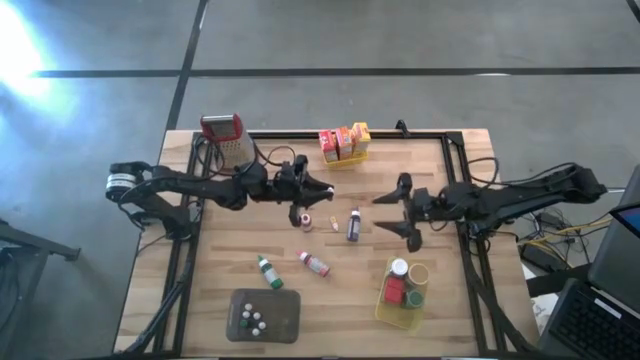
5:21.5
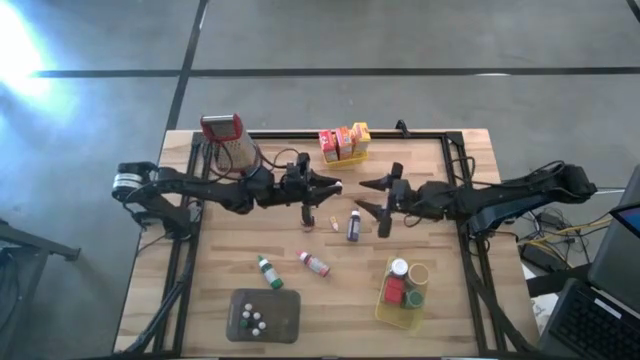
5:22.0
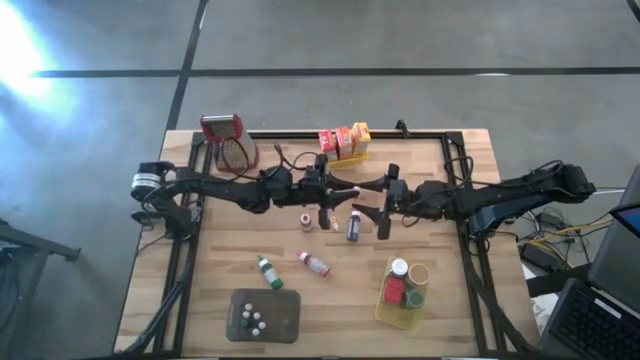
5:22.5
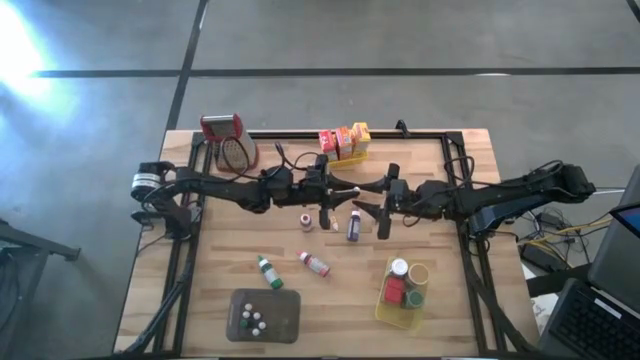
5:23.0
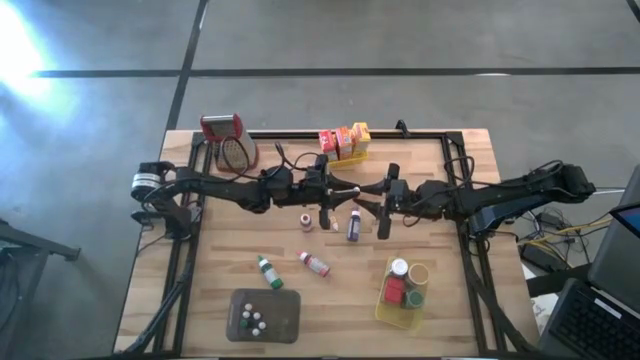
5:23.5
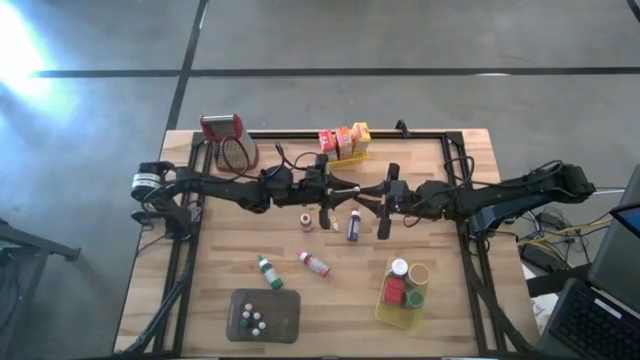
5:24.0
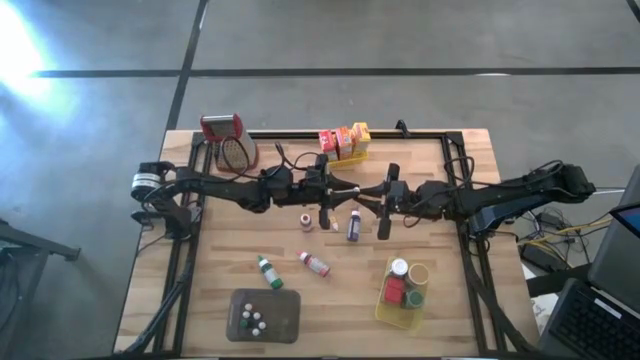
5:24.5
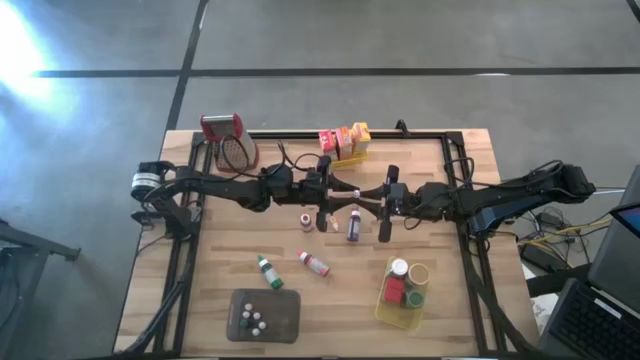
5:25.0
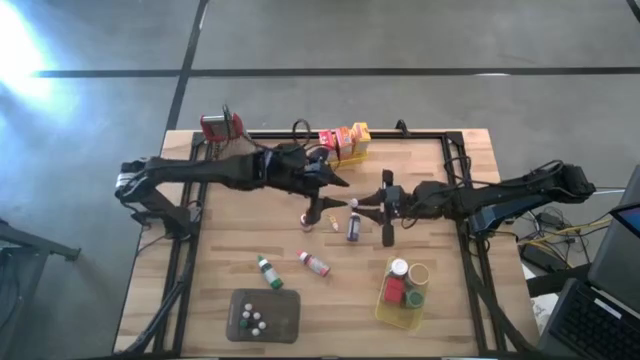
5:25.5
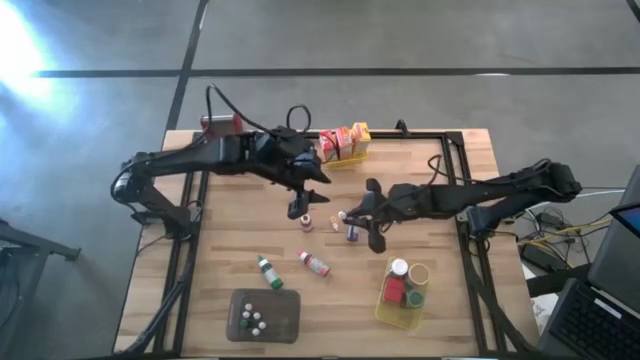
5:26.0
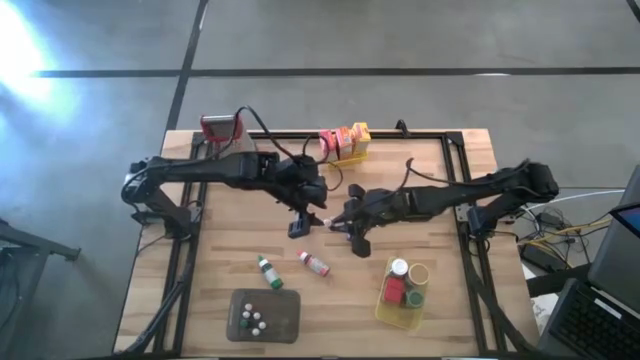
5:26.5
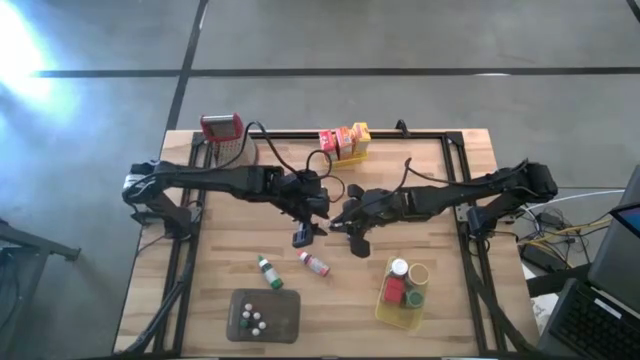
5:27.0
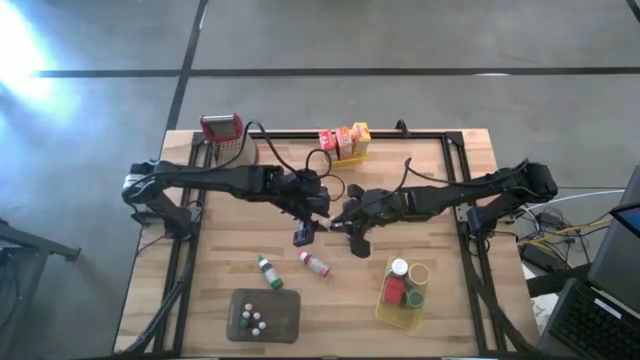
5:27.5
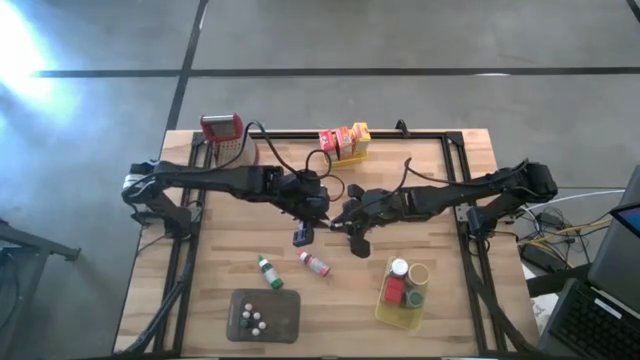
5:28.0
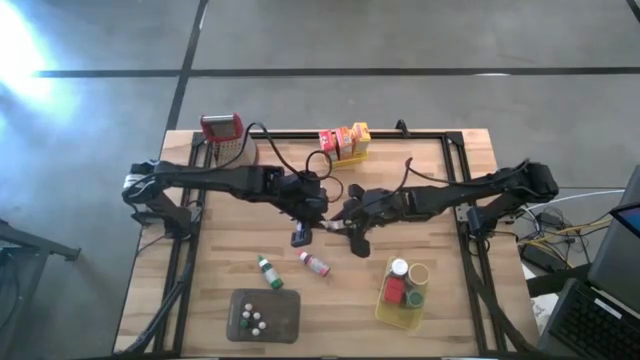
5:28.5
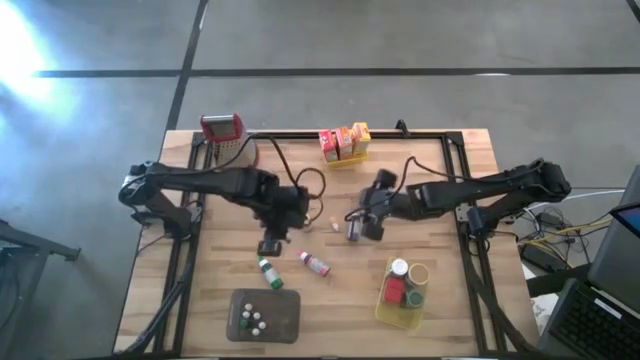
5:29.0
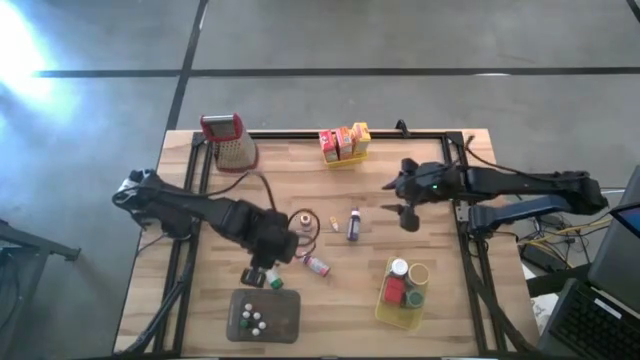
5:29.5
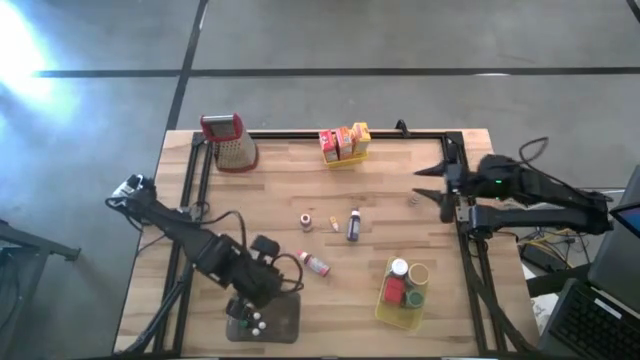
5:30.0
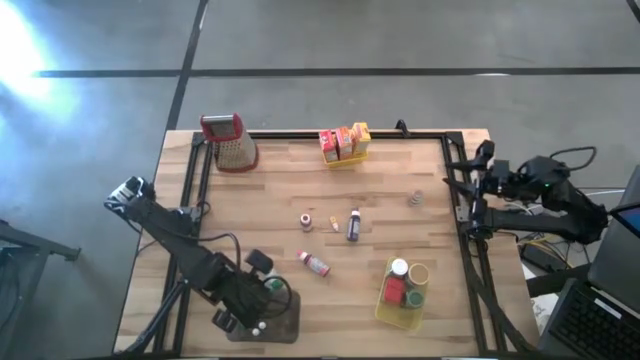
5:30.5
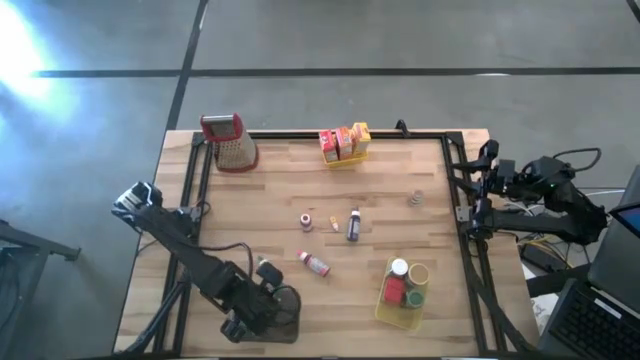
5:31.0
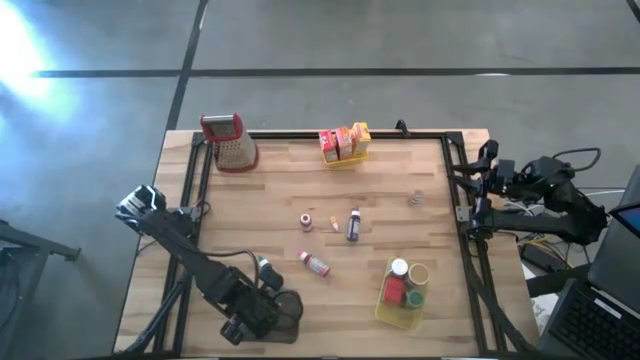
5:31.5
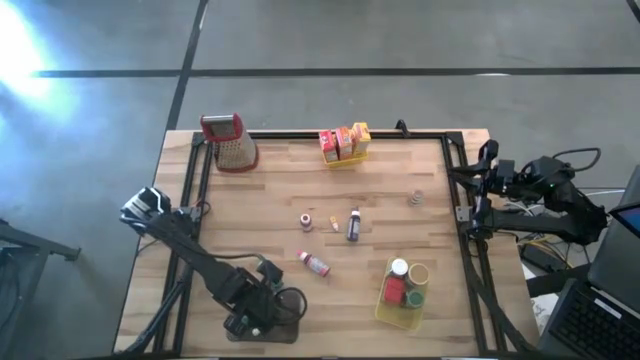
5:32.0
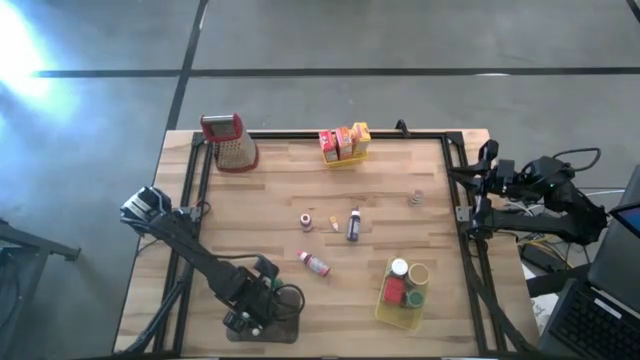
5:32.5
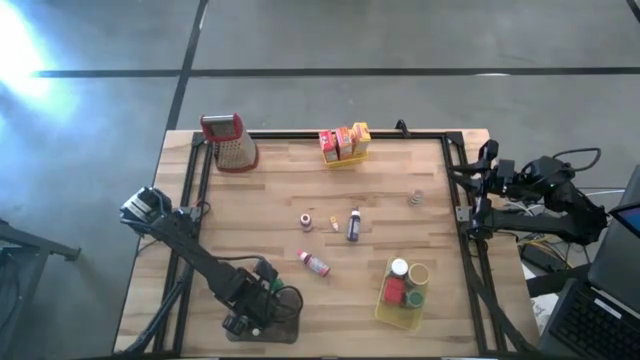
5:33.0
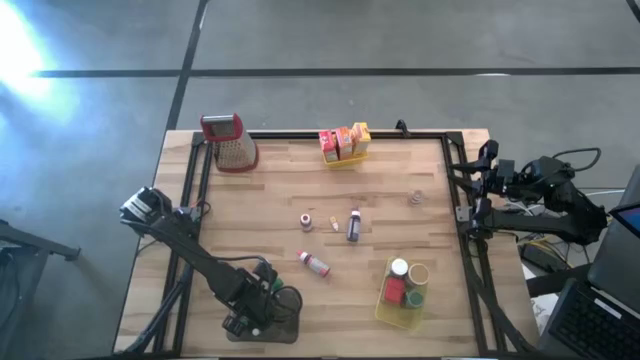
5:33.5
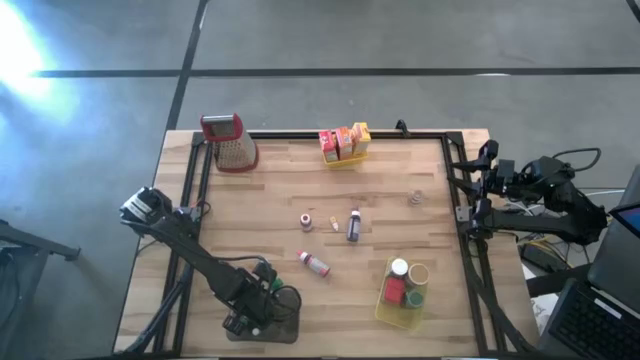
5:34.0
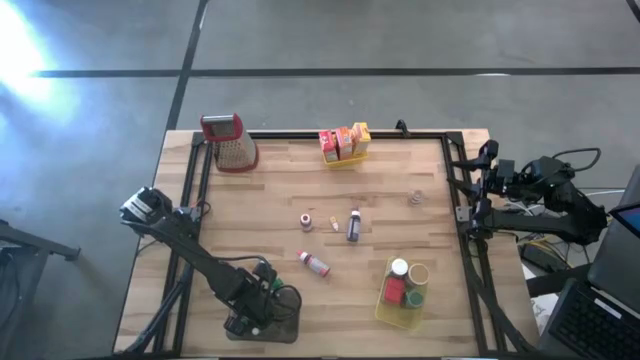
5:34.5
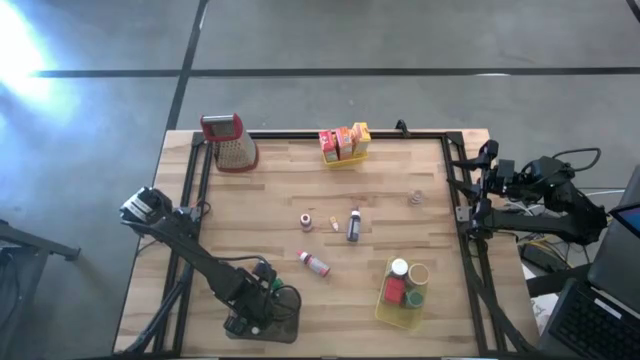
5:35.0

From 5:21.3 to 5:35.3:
Task: Pick & Place Kitchen Items
Put the black food coloring bottle into the black bin

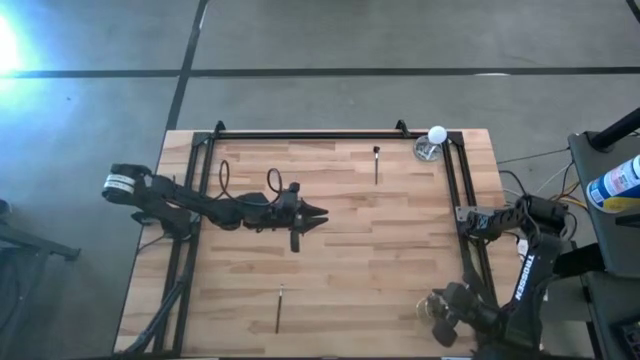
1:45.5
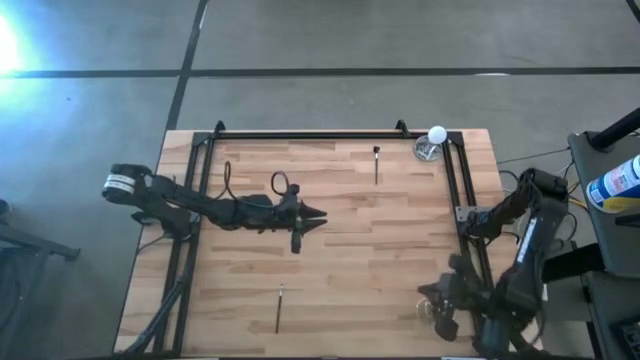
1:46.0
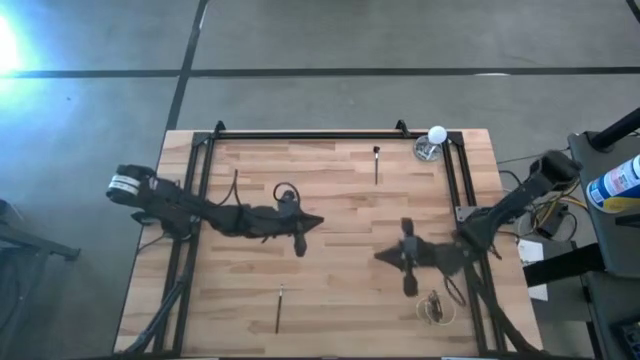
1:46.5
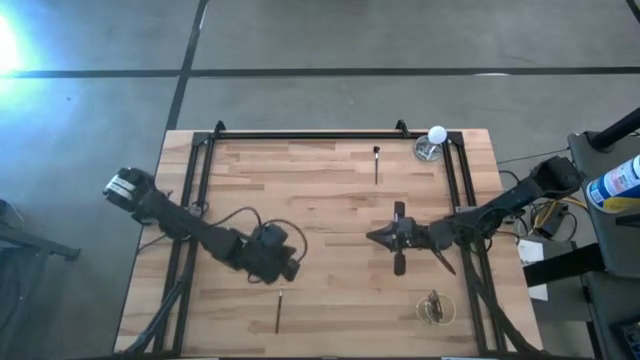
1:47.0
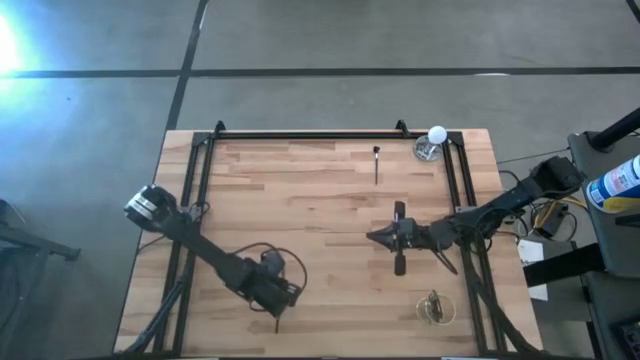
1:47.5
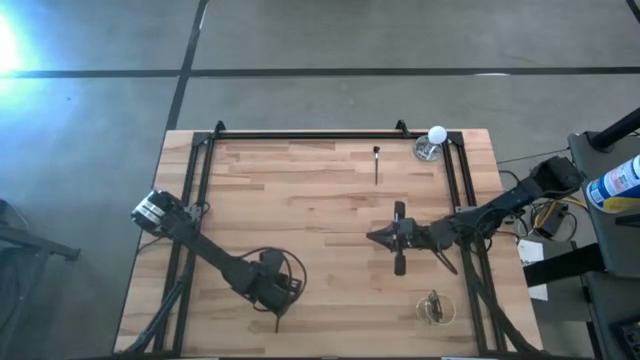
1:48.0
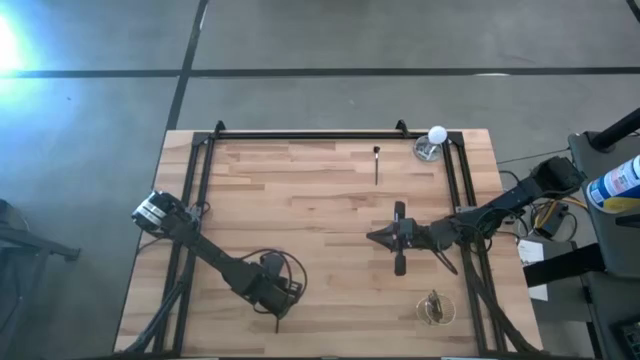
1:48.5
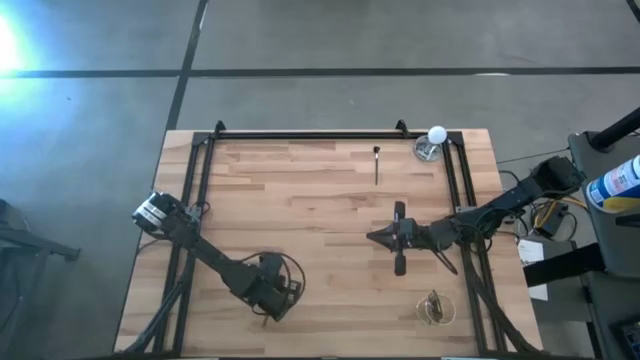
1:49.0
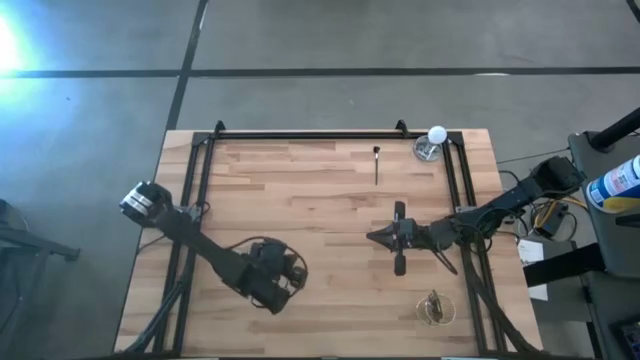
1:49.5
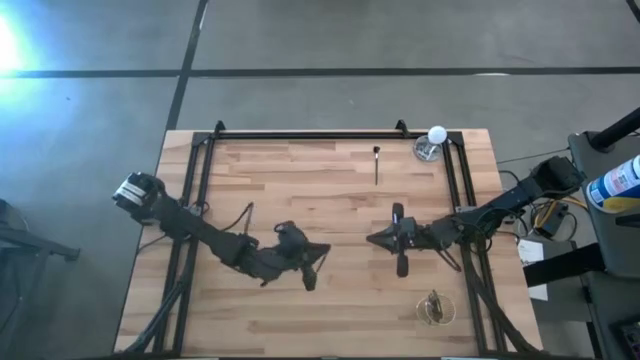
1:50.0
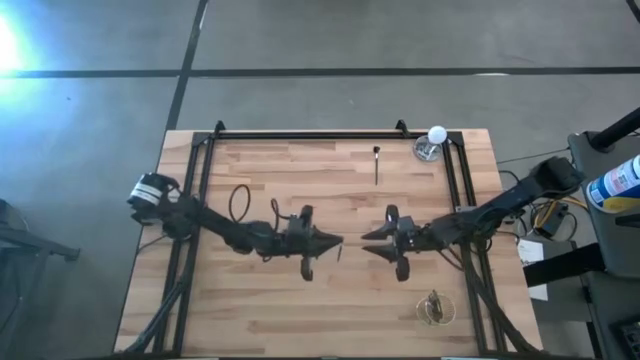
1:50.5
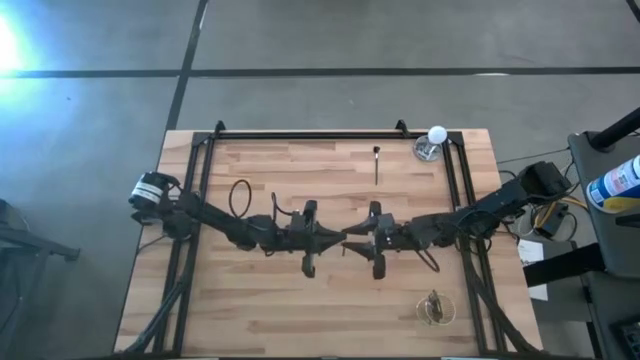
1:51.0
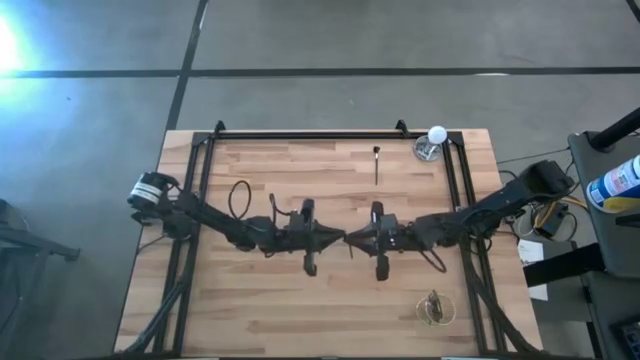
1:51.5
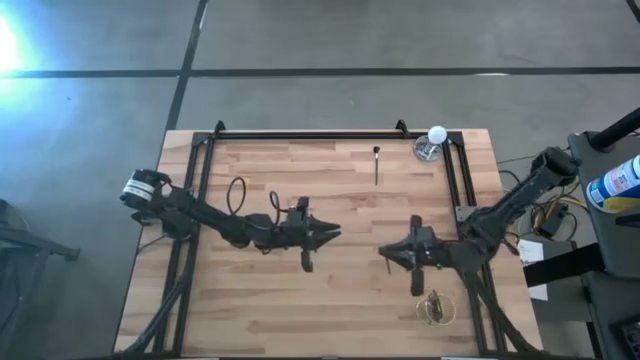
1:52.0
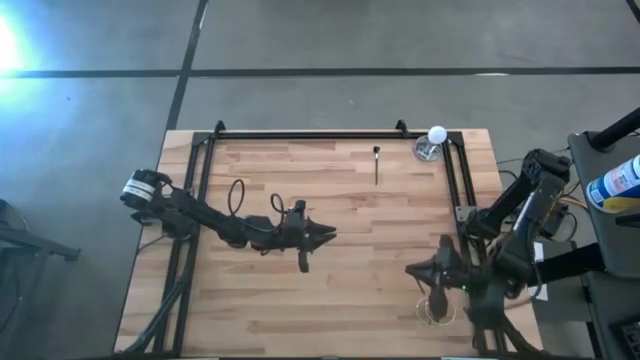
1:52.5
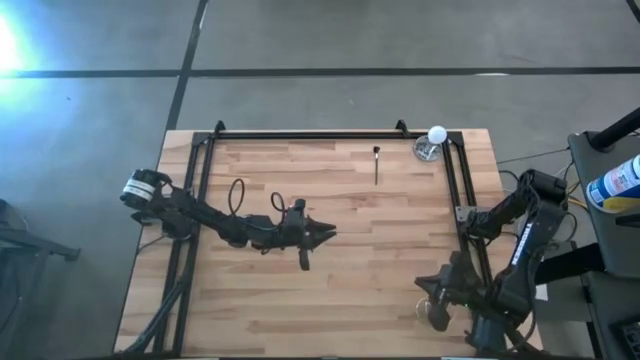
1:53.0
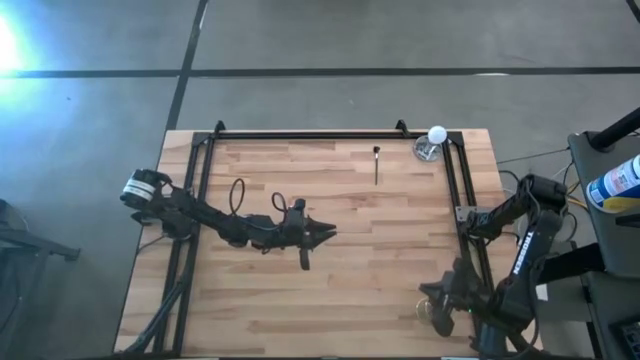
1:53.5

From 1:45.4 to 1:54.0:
Task: Pick & Place Makeup Brushes
Put the eyeshadow brush into the makeup brush holder
